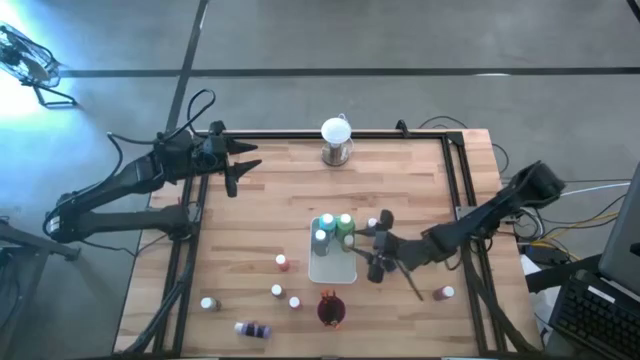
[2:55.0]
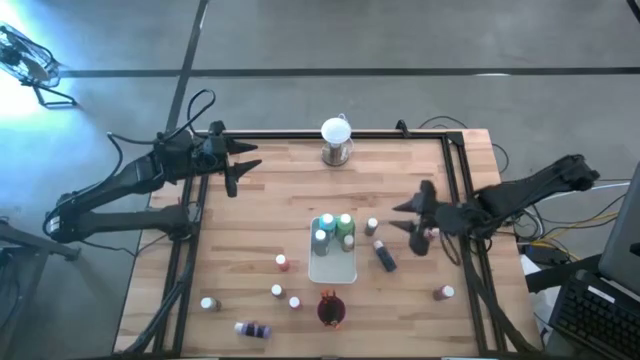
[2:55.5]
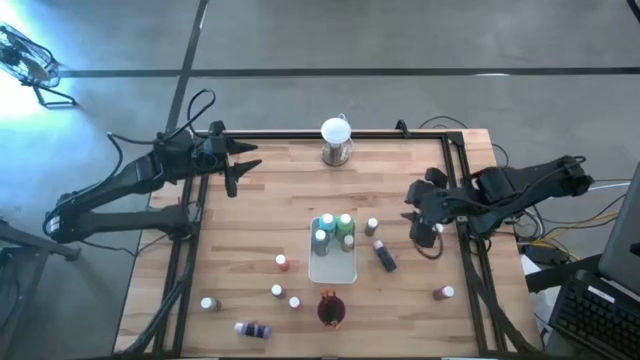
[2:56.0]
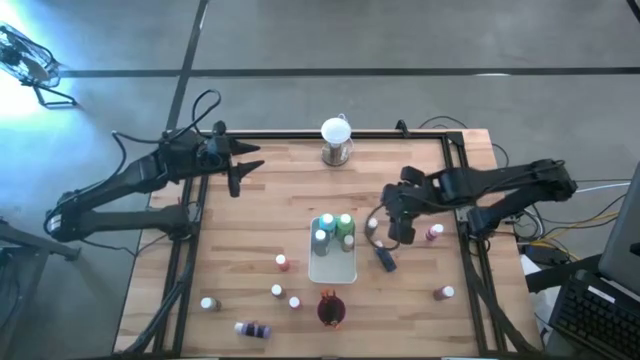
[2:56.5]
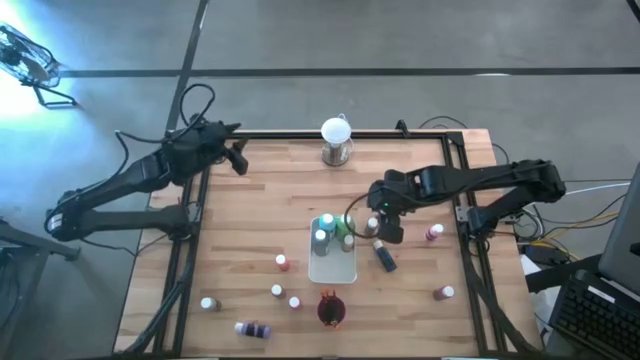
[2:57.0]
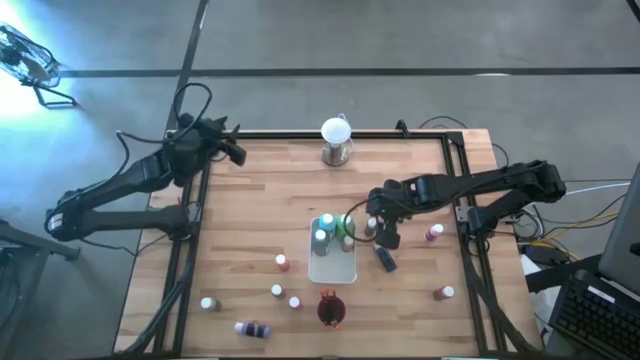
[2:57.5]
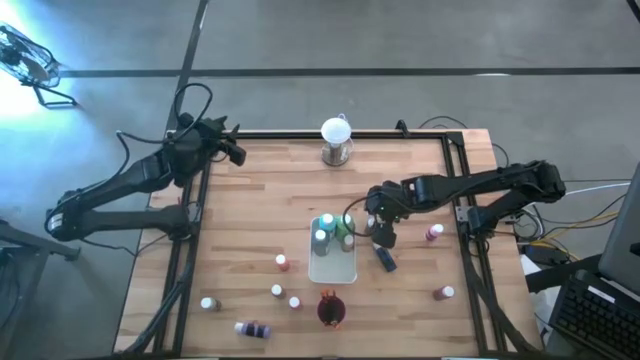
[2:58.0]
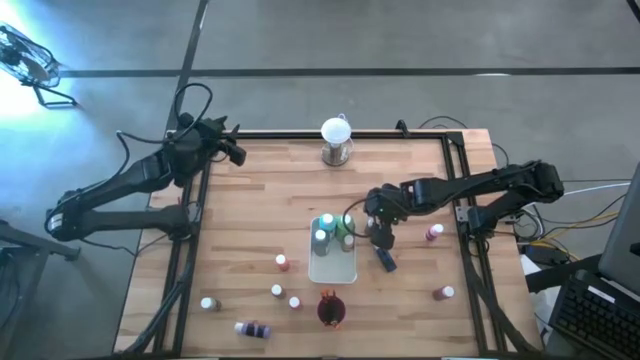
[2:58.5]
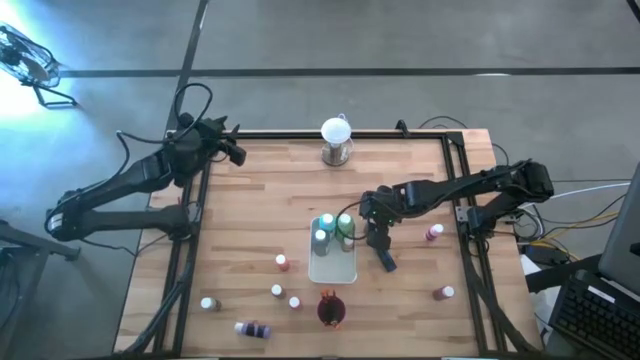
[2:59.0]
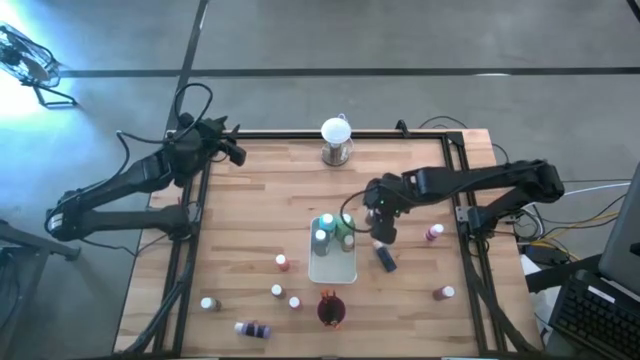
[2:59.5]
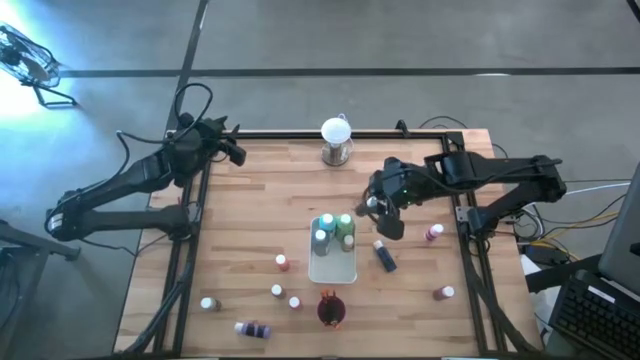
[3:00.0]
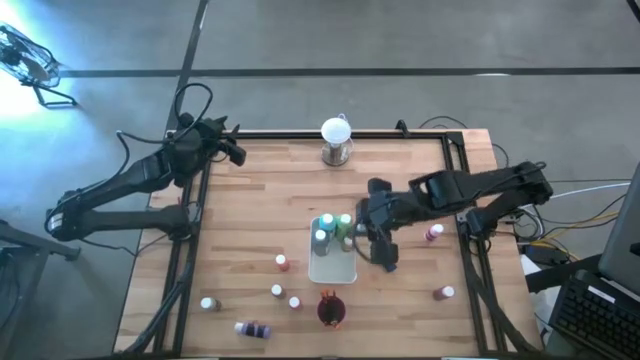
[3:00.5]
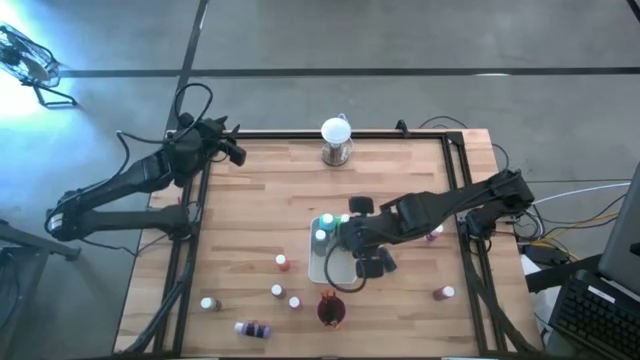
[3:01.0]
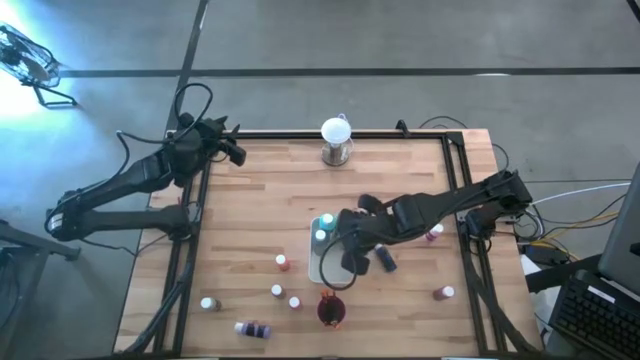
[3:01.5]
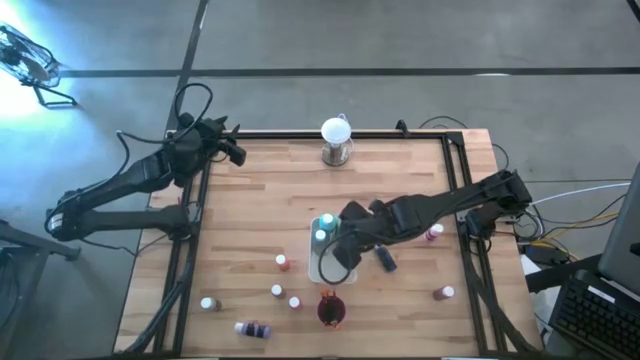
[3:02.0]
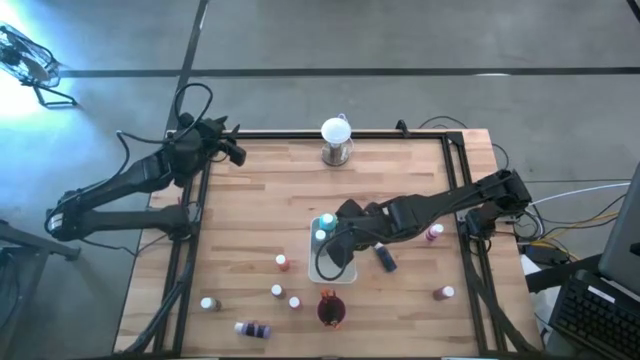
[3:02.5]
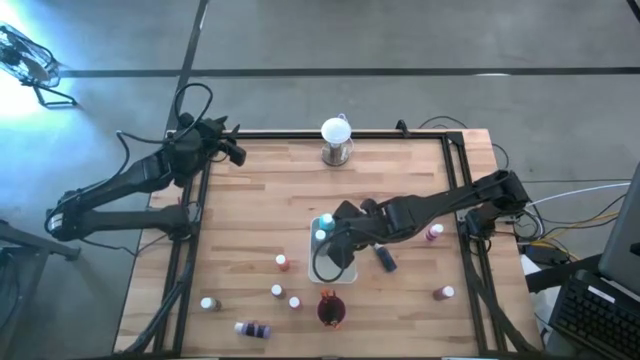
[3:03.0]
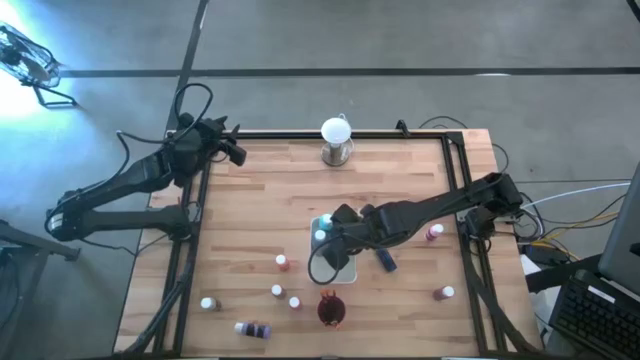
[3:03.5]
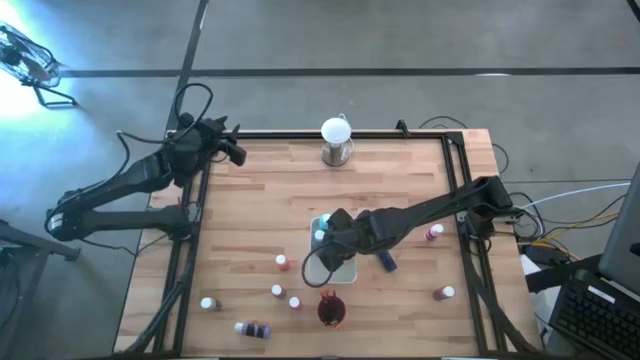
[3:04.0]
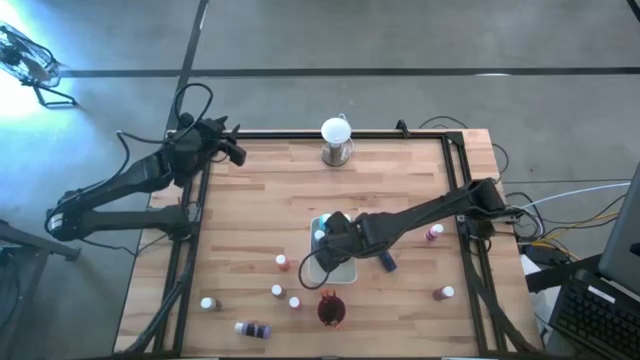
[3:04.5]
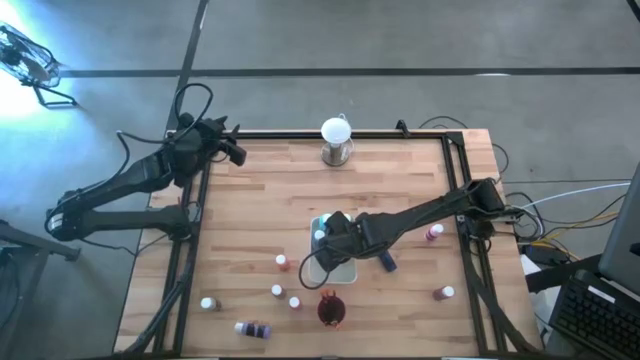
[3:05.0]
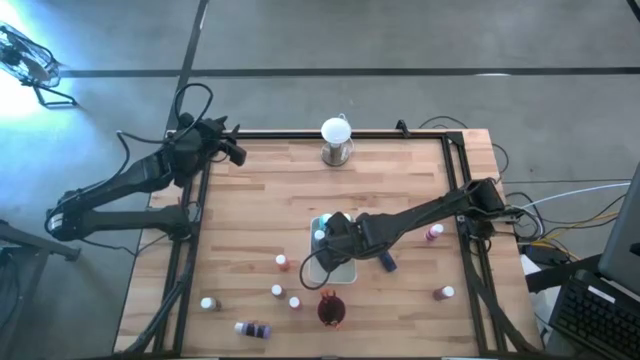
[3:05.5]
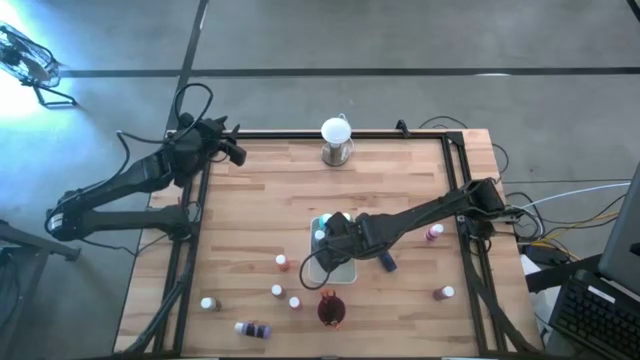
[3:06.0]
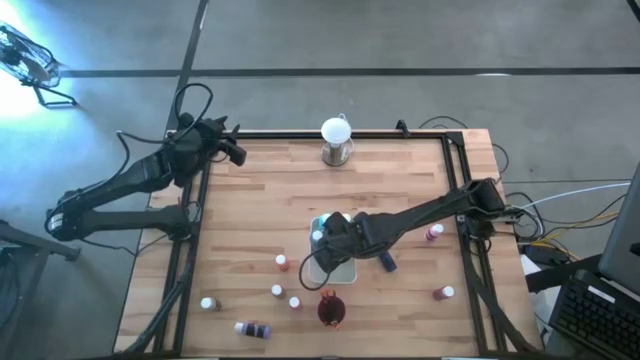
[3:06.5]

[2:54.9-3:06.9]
Task: Pick & Place Paint Supplies
Put the brown paint bottle into the white bin

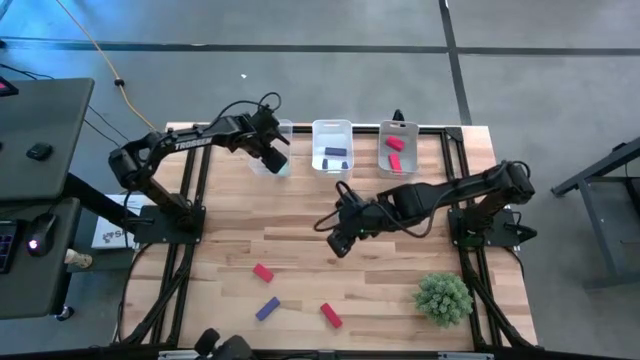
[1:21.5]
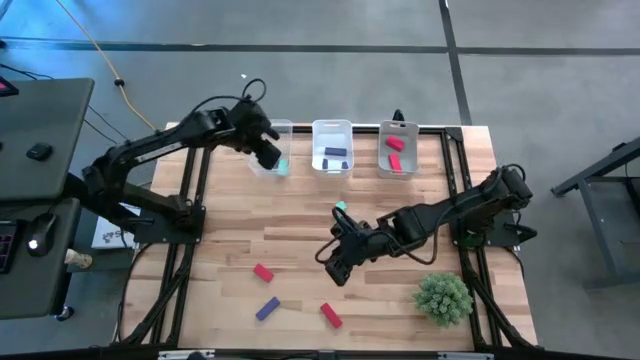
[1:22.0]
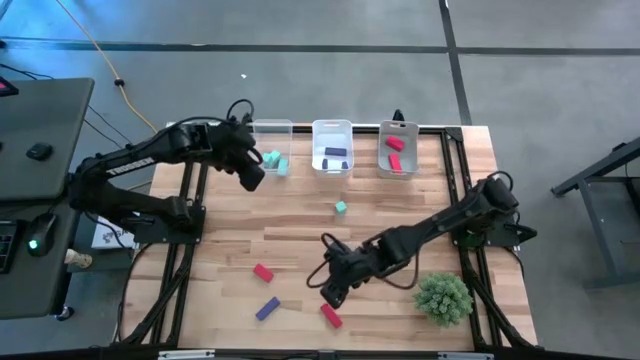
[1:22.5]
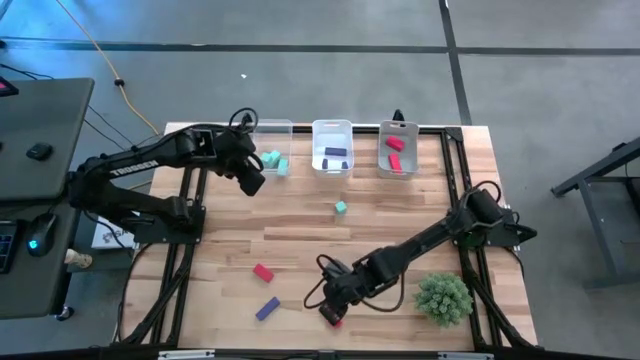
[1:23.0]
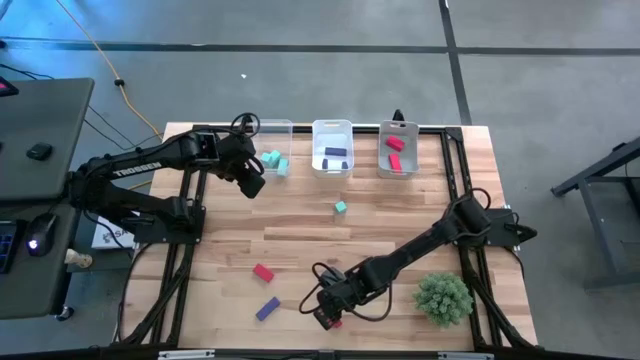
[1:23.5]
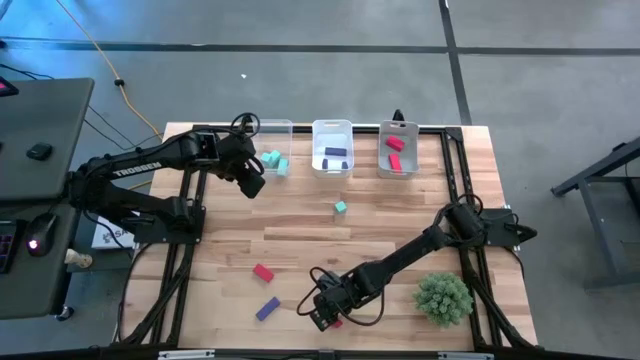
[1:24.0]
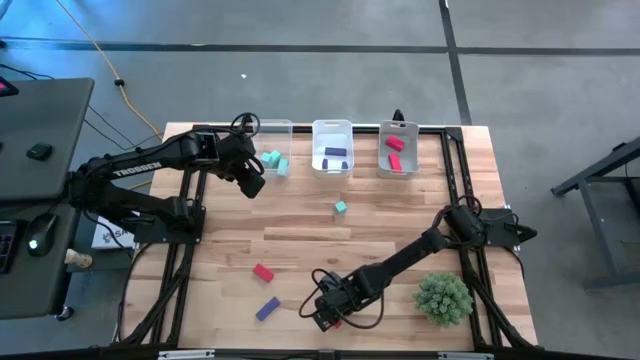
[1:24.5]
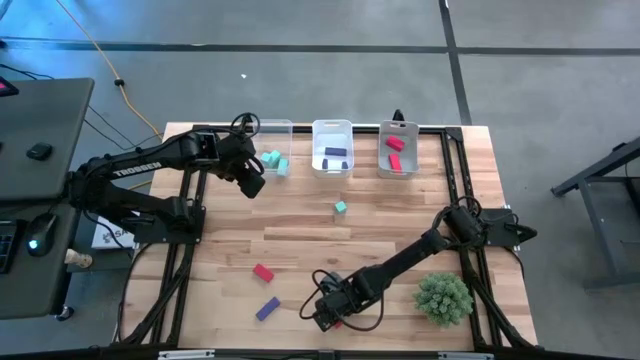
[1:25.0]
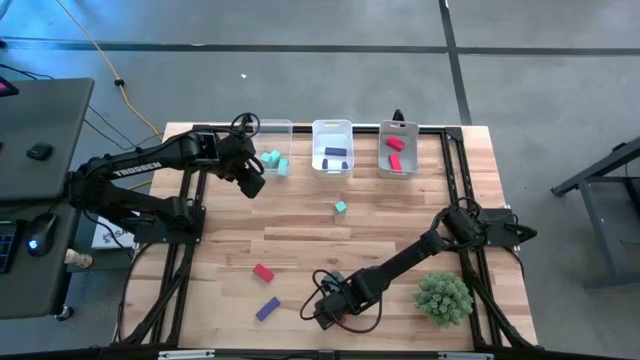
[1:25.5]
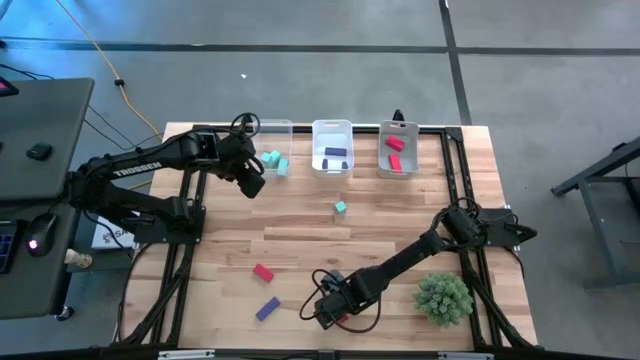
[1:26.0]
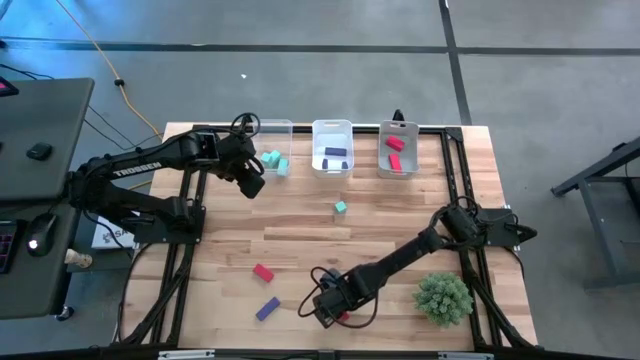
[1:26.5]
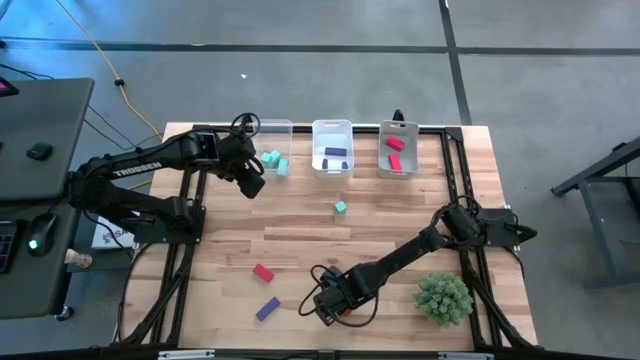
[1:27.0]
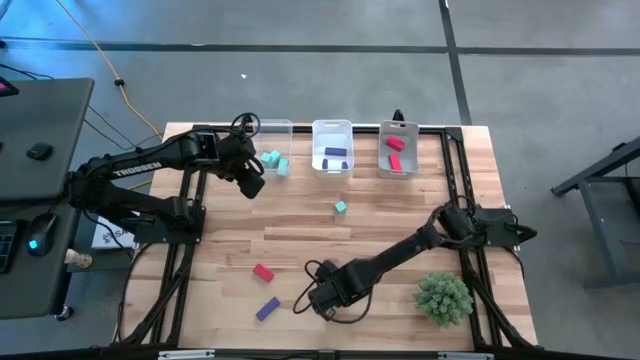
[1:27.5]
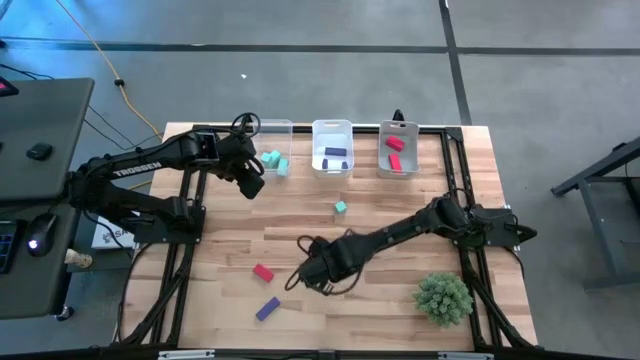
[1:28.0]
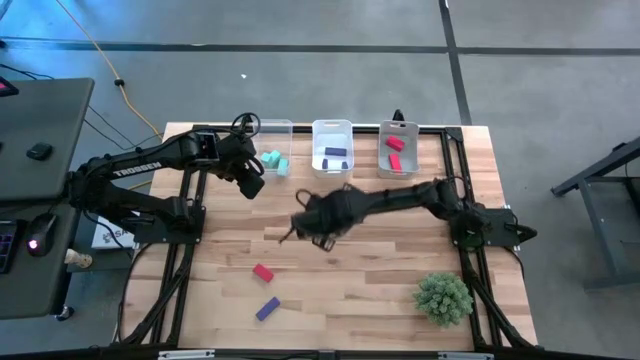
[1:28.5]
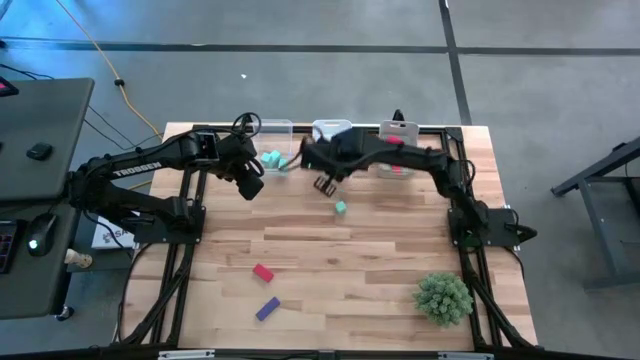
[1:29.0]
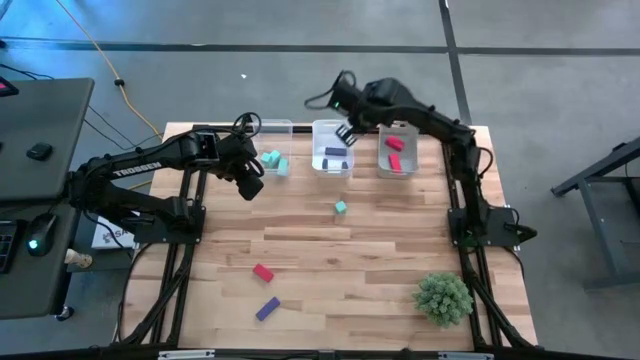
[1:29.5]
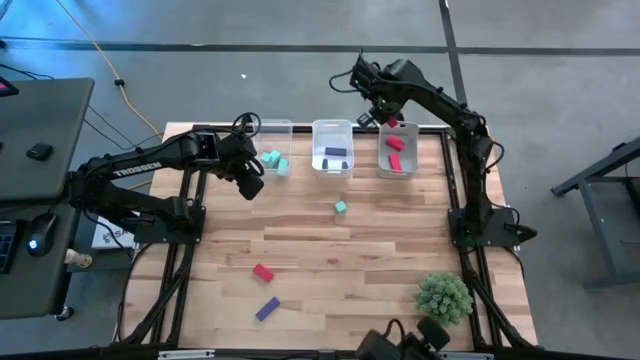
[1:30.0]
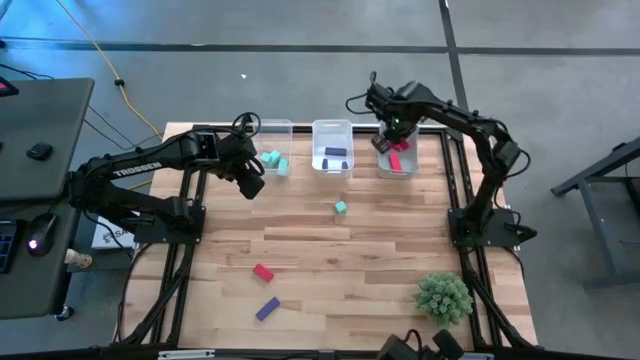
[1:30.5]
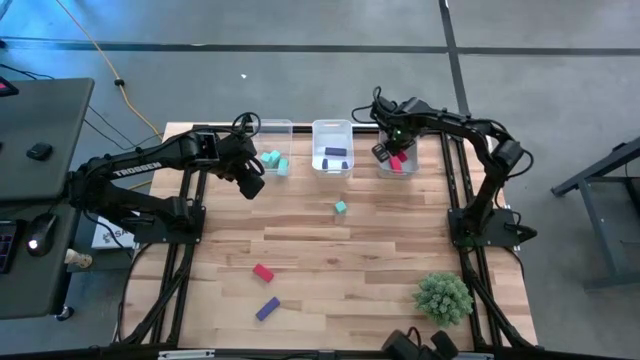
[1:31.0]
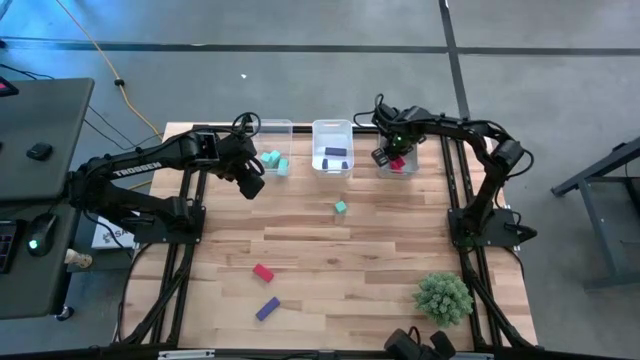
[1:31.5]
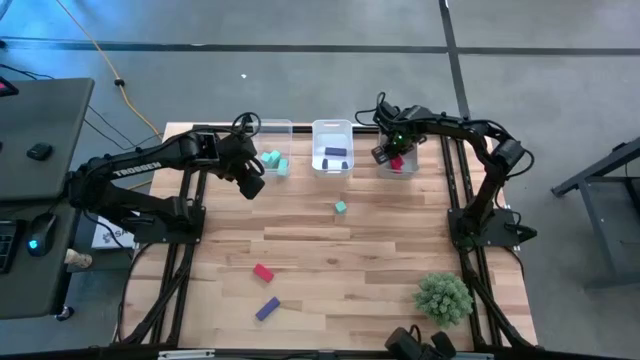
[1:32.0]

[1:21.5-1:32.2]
Task: Sort & place blocks by color
Put the red block into the gray bin
